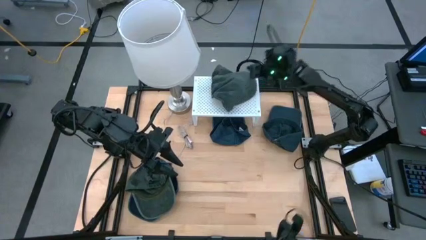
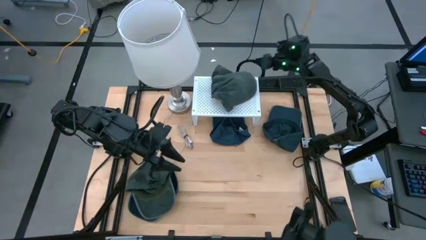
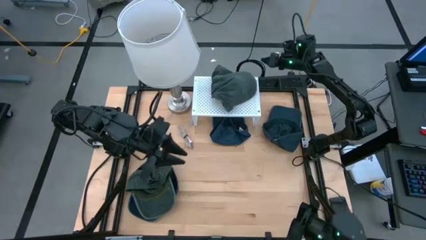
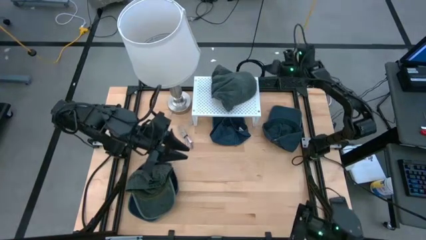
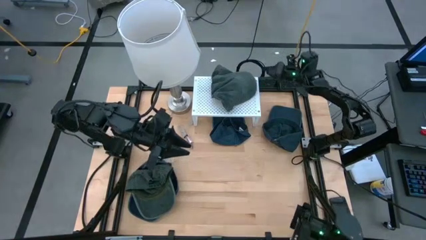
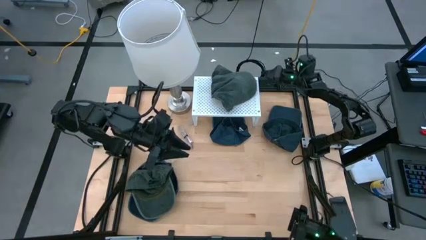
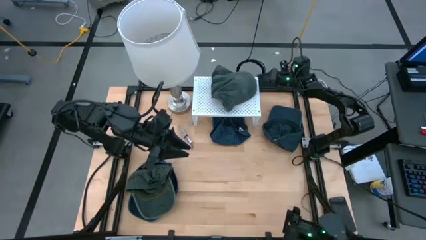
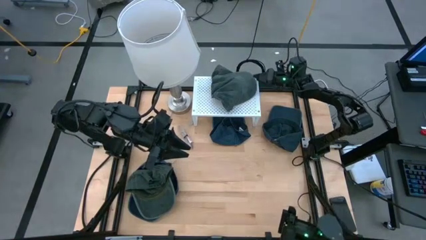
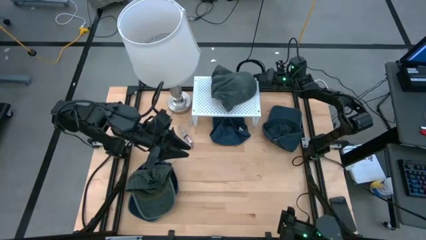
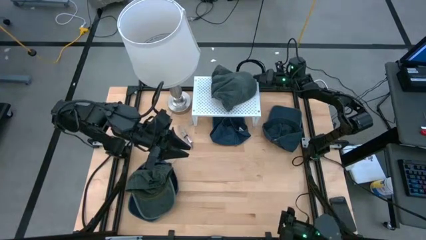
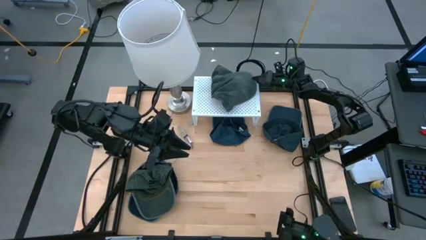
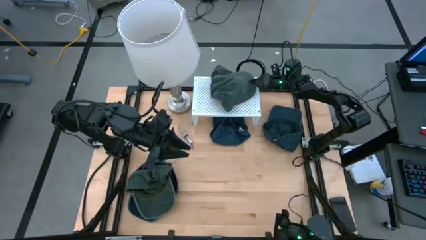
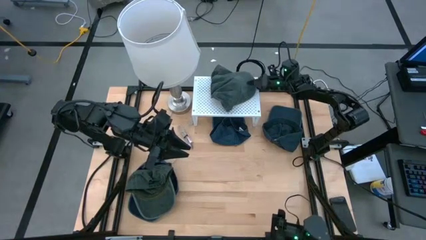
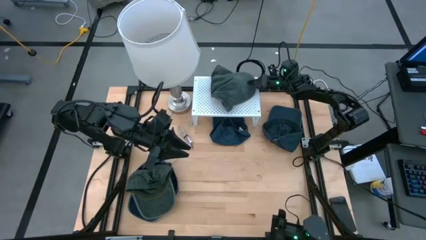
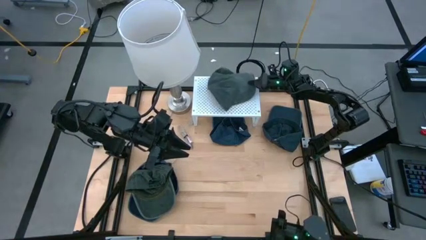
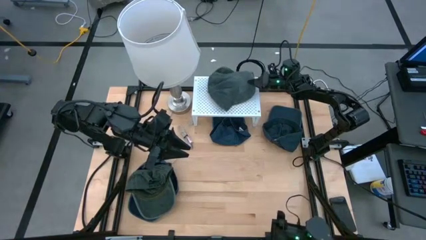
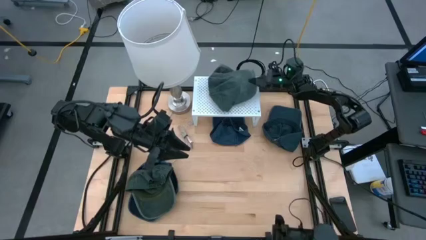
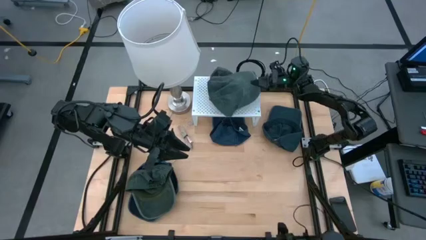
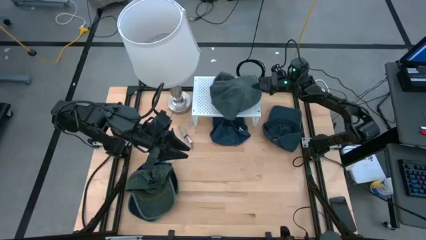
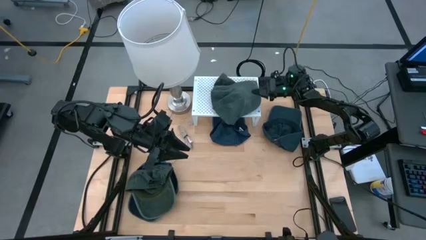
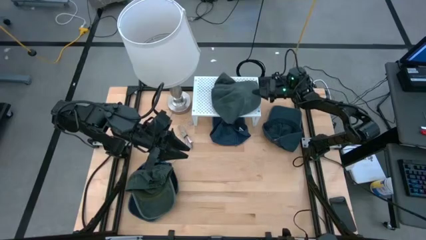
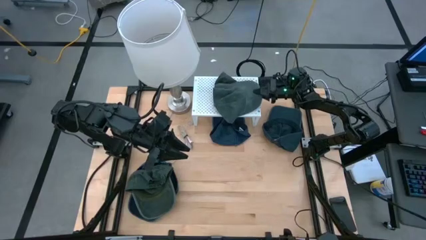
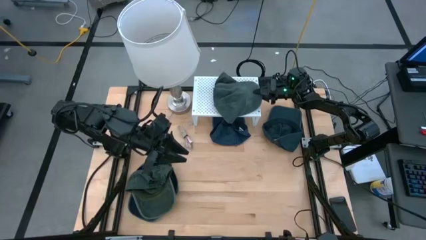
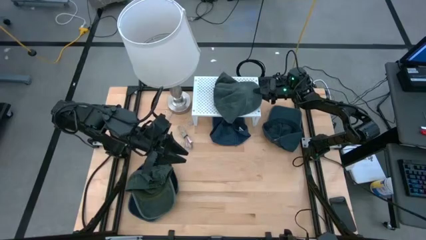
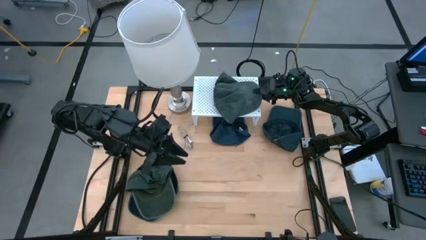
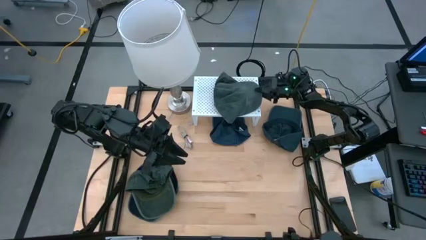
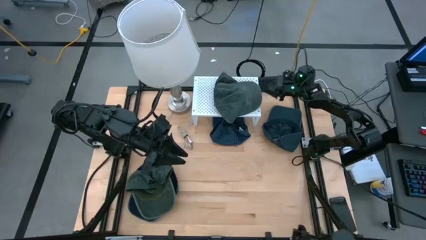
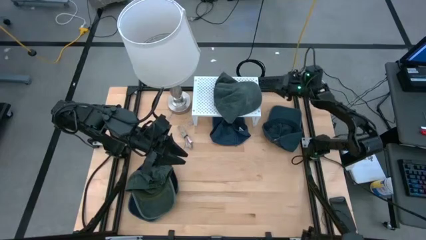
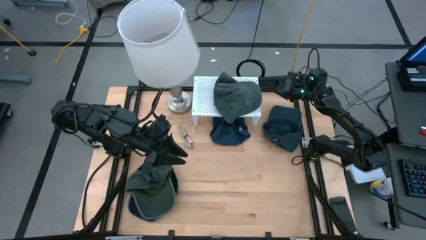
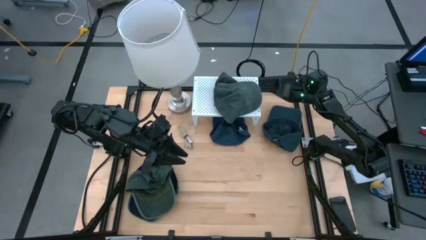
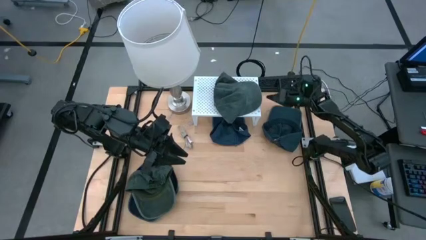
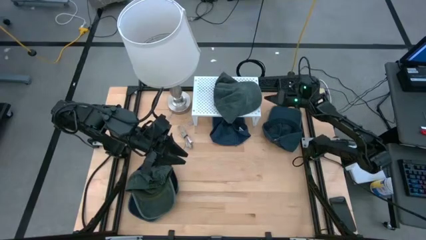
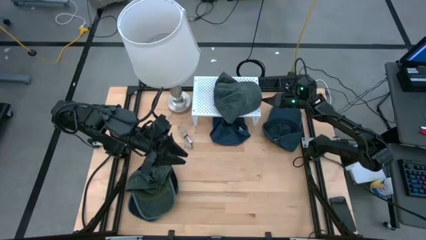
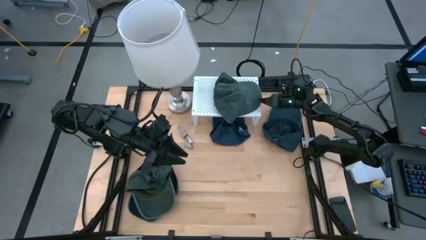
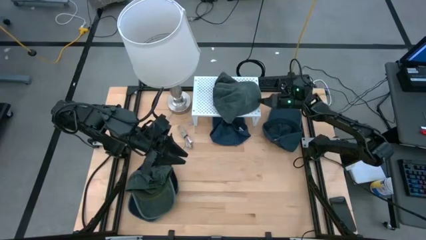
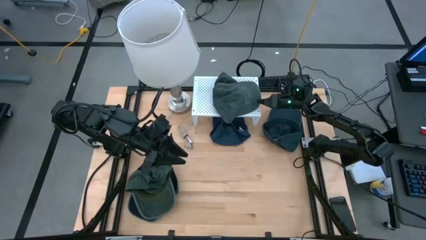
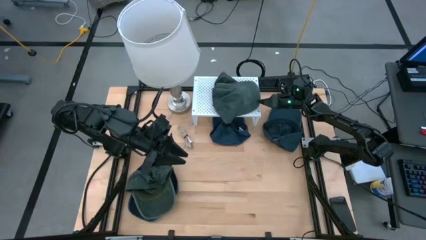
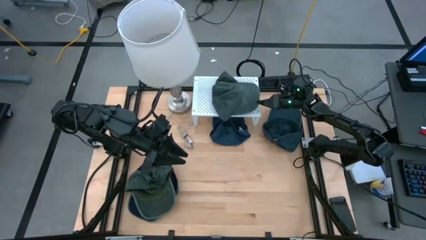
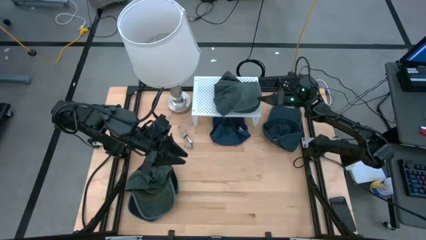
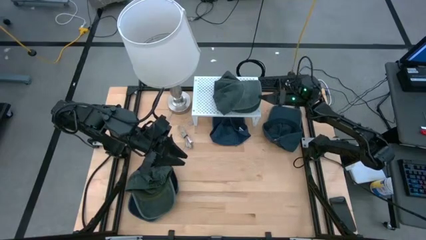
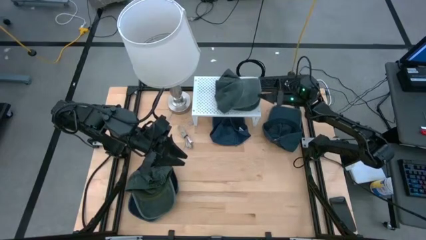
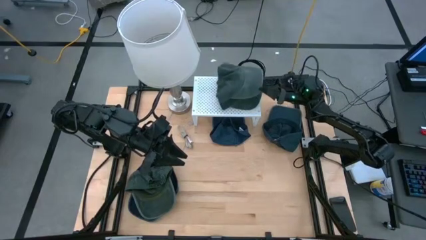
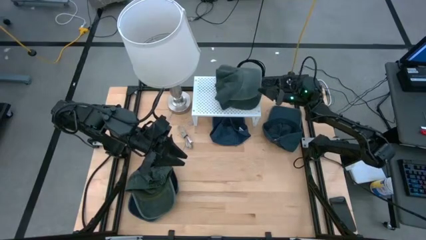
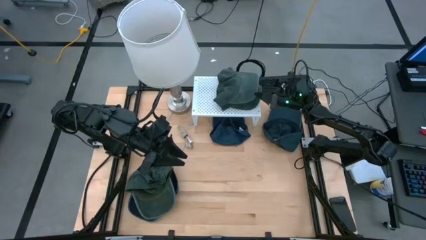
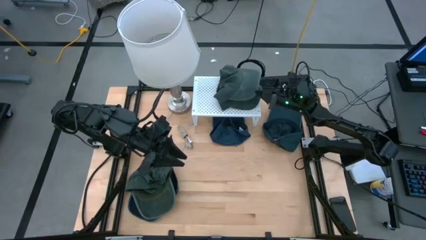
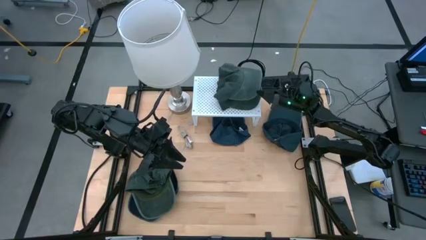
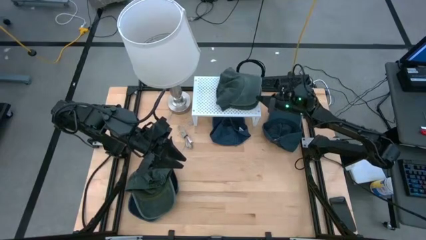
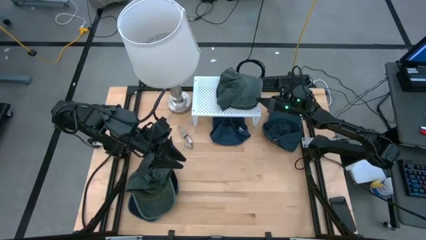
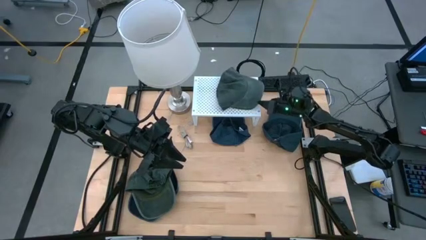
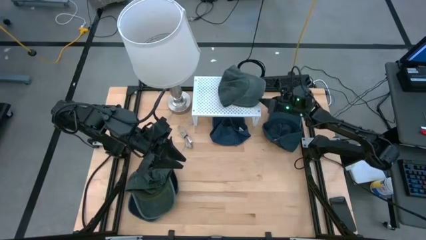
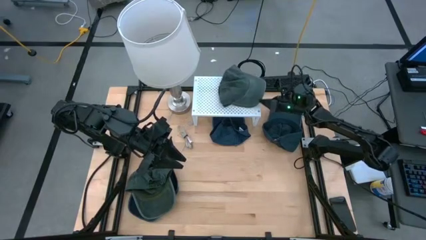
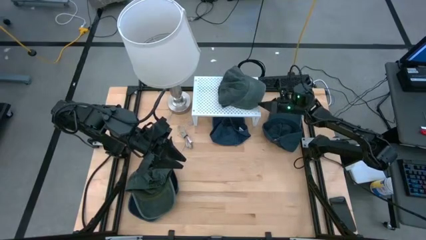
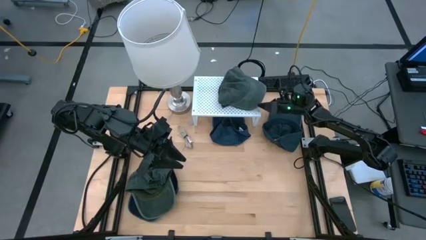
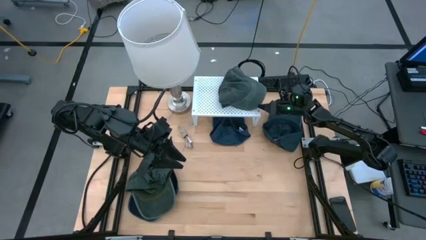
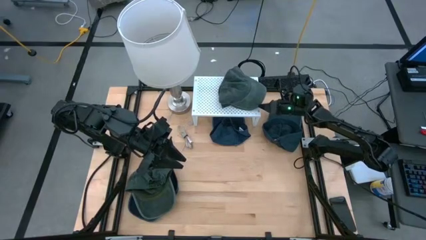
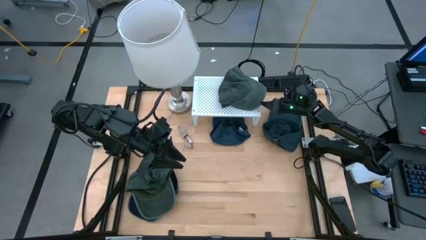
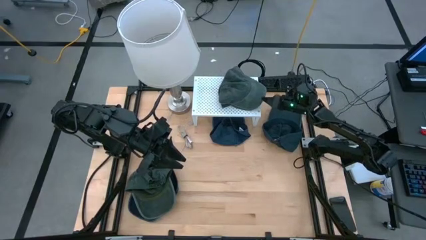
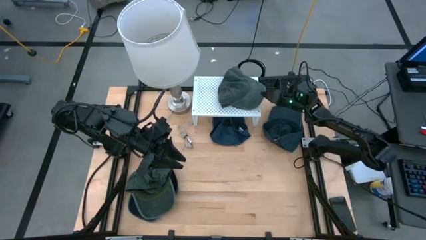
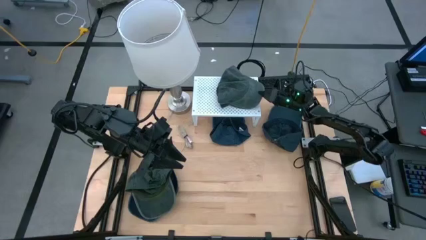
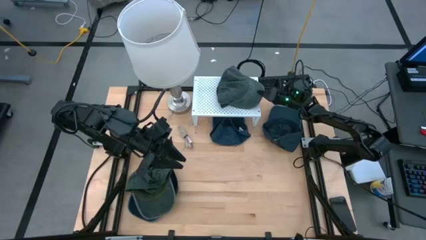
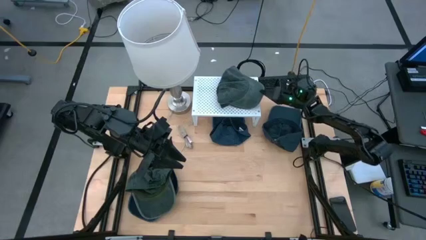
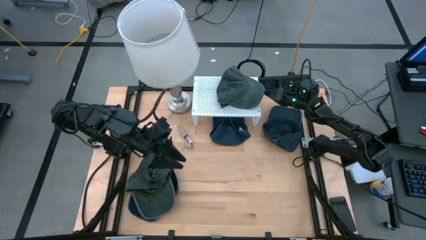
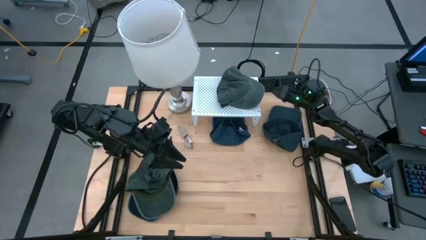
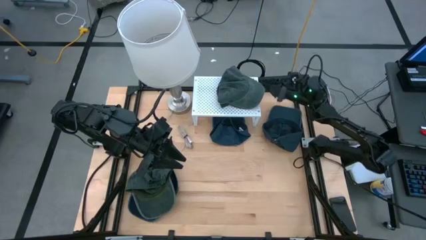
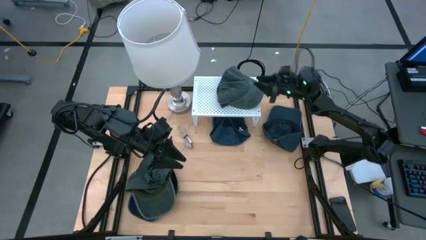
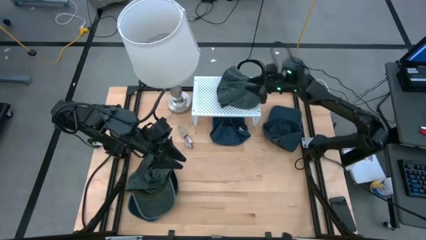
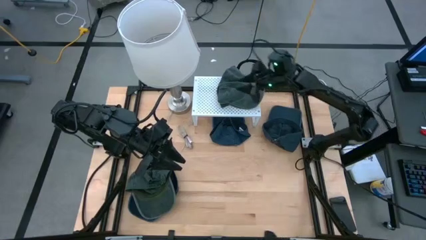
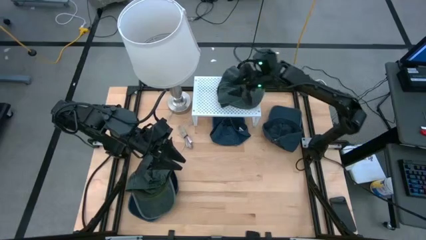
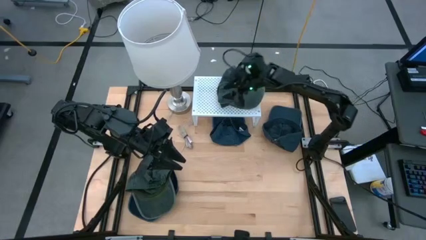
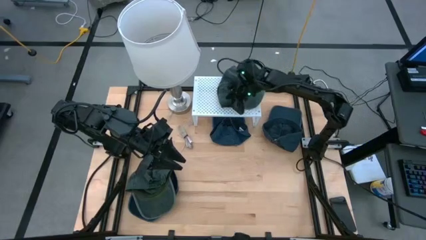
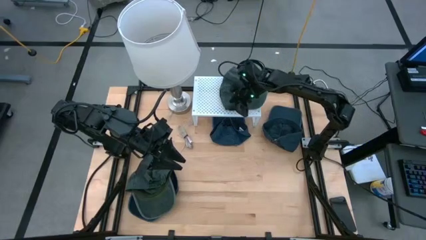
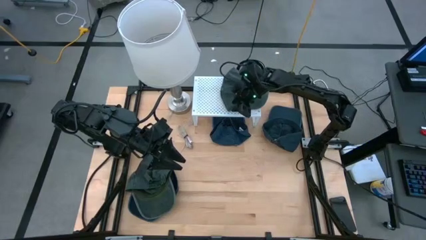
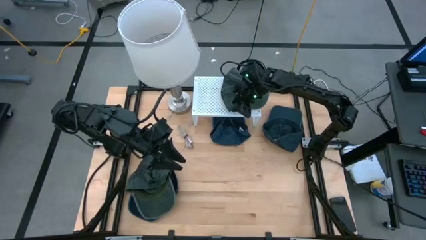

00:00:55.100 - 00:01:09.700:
Task: Pick & Place hat
Stack the top gray cap on the gray cap on the shelf

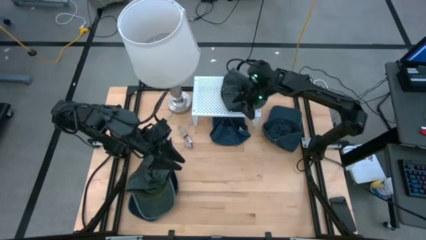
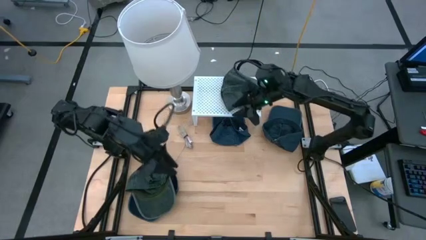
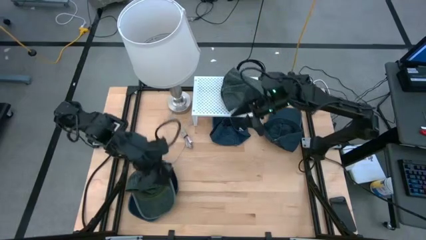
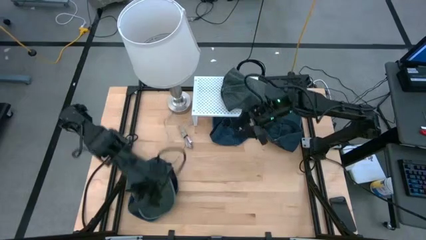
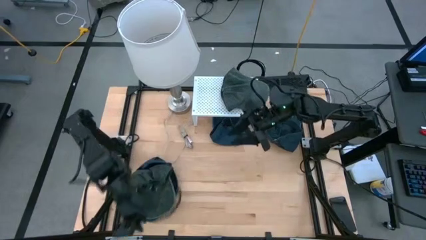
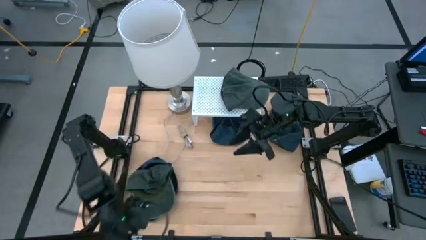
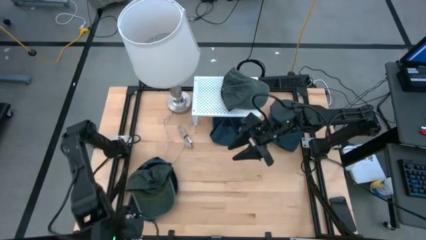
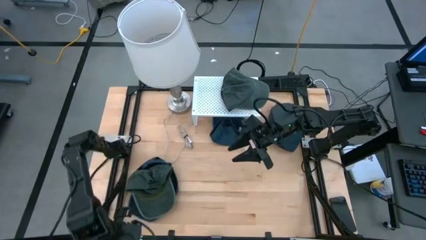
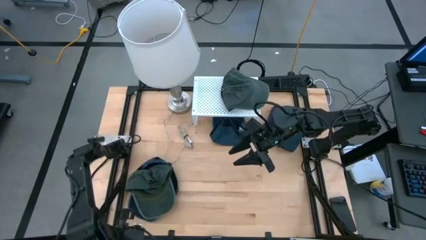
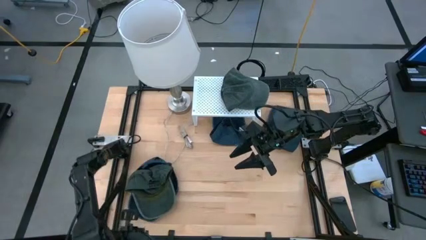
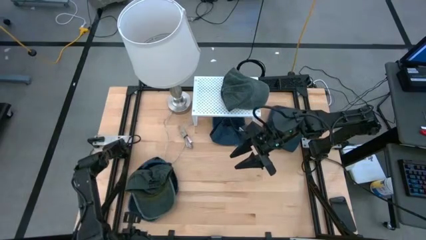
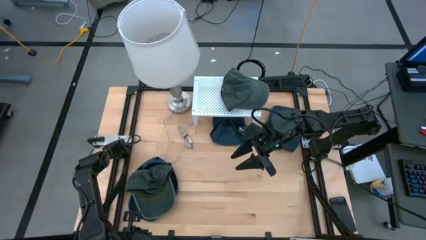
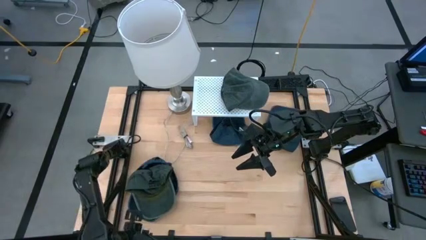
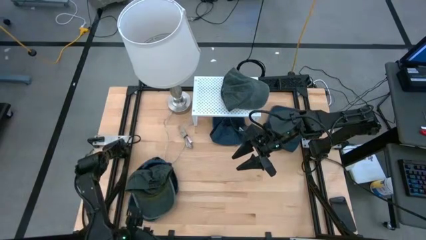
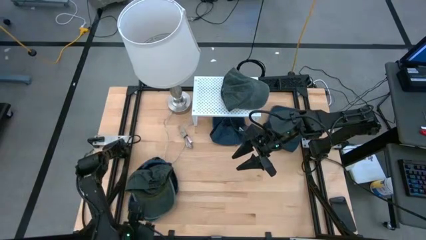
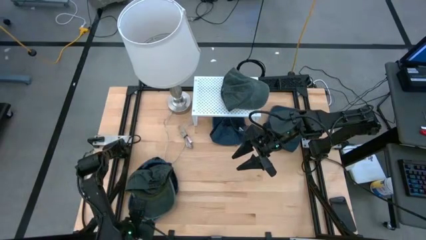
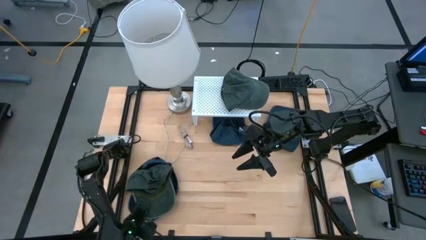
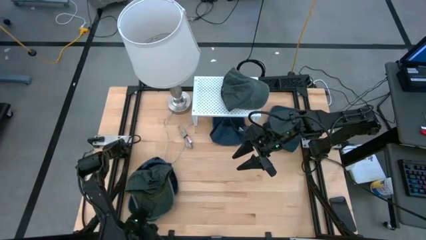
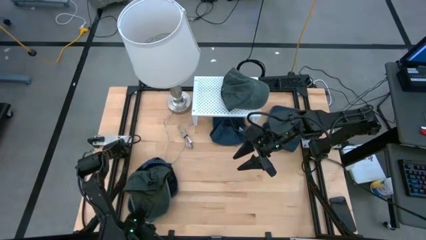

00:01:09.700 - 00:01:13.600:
Stack the gray cap on the gray caps on the shelf
